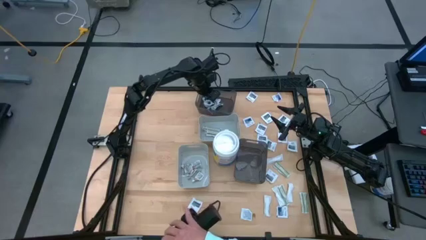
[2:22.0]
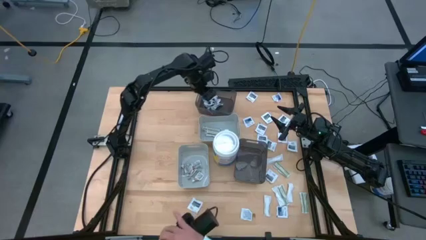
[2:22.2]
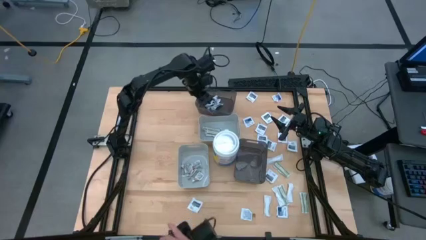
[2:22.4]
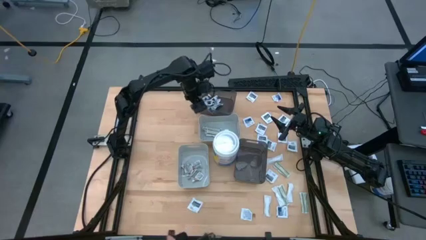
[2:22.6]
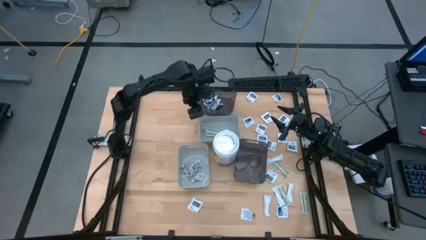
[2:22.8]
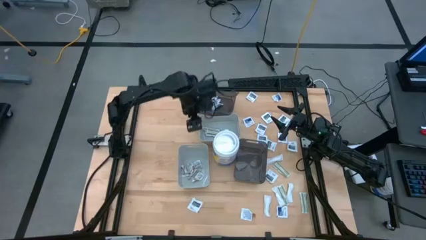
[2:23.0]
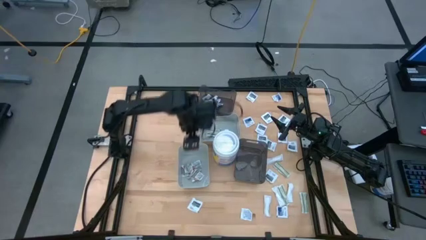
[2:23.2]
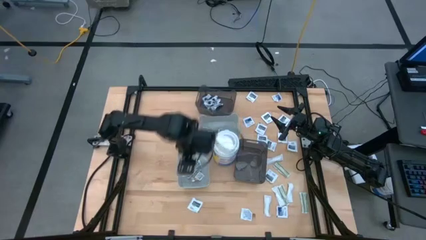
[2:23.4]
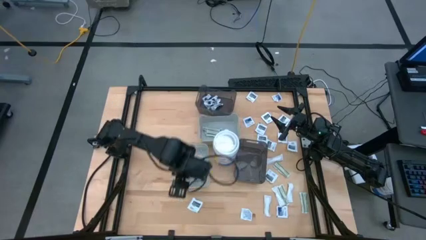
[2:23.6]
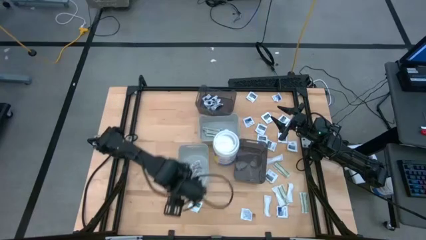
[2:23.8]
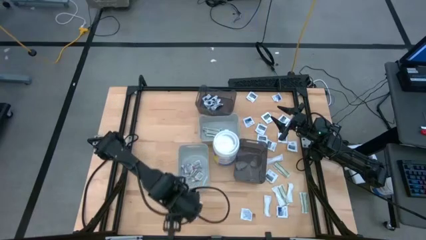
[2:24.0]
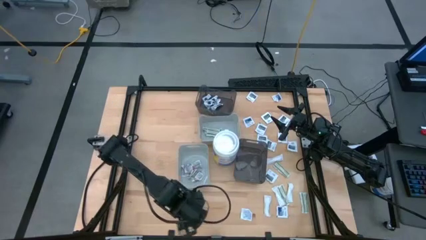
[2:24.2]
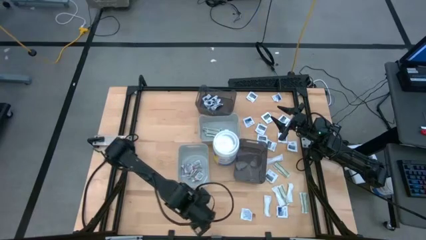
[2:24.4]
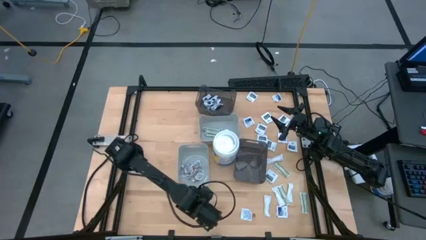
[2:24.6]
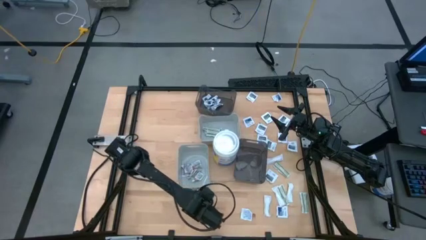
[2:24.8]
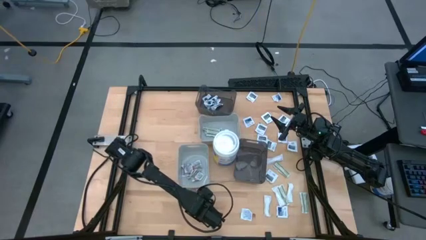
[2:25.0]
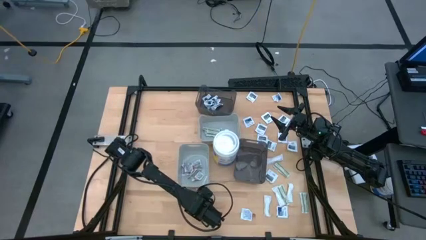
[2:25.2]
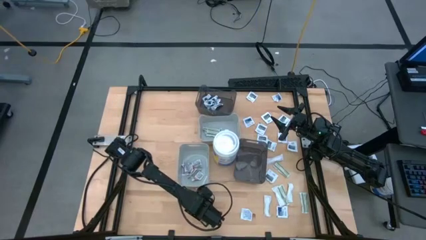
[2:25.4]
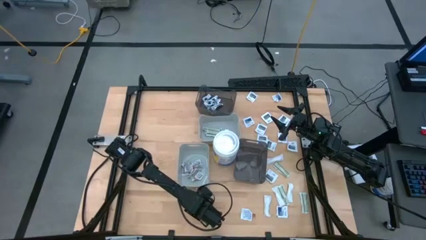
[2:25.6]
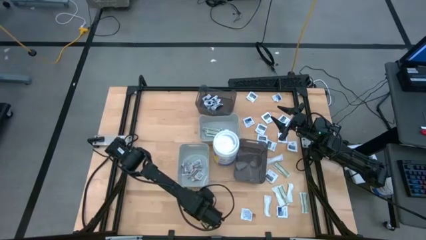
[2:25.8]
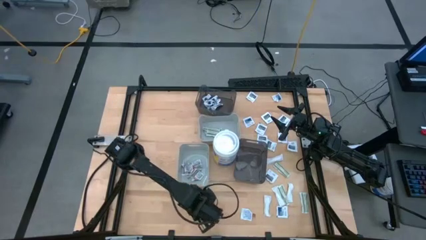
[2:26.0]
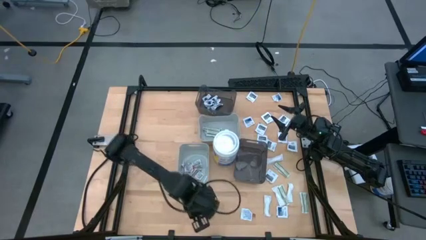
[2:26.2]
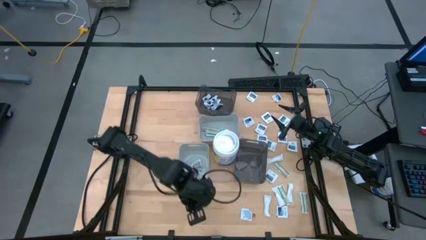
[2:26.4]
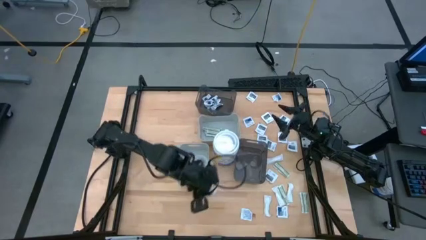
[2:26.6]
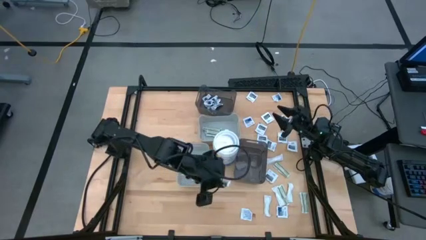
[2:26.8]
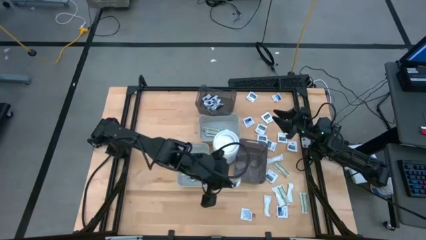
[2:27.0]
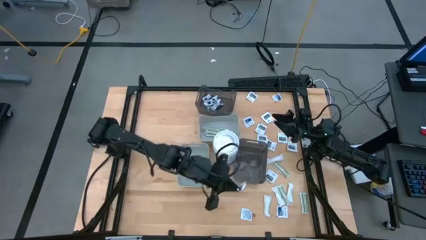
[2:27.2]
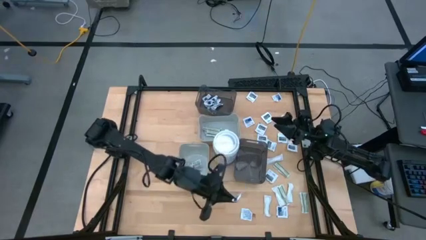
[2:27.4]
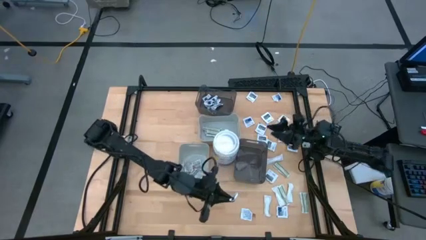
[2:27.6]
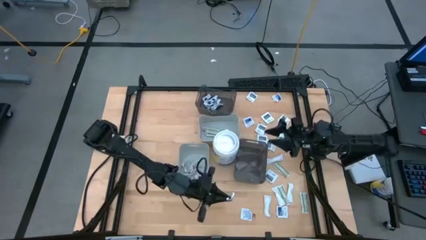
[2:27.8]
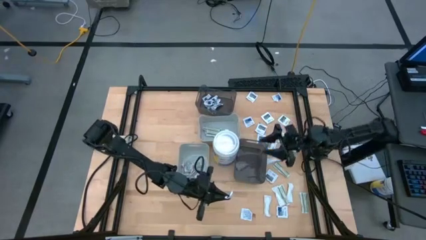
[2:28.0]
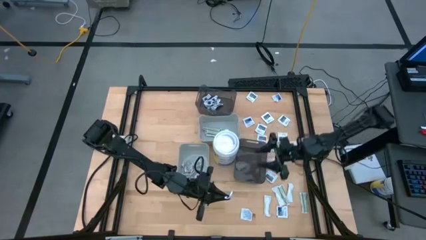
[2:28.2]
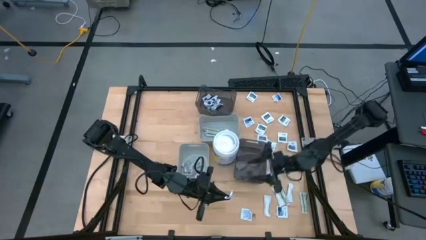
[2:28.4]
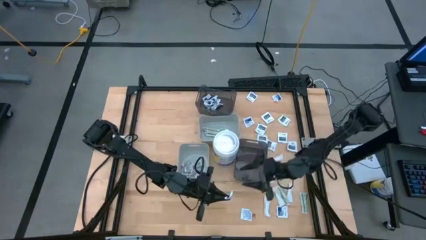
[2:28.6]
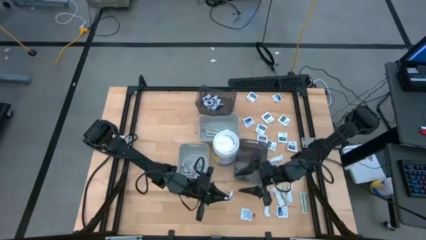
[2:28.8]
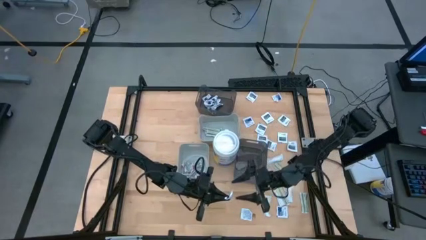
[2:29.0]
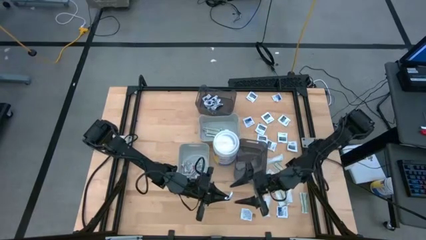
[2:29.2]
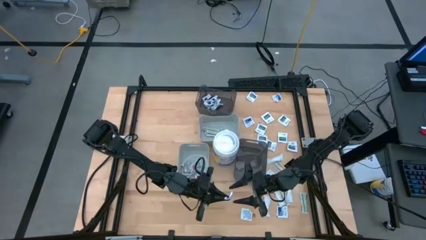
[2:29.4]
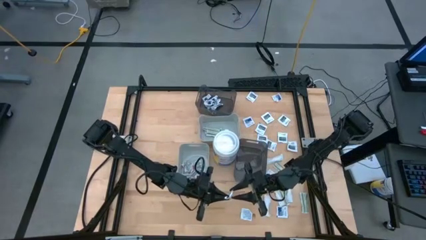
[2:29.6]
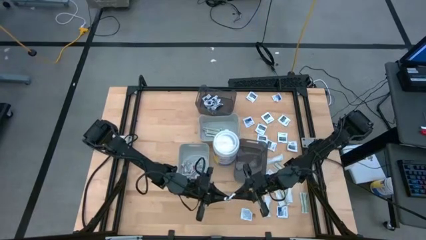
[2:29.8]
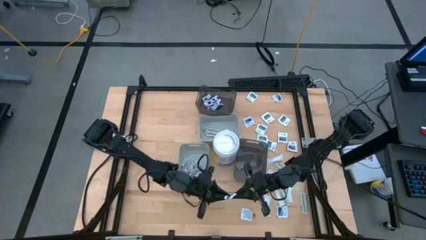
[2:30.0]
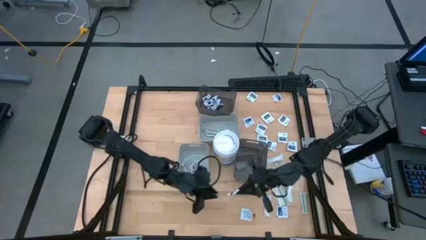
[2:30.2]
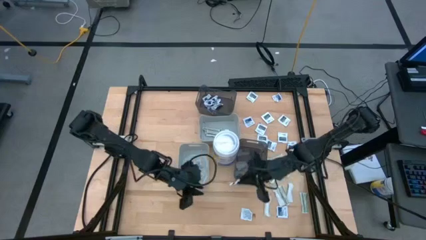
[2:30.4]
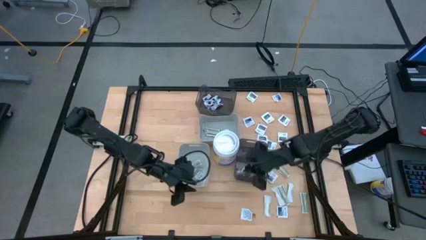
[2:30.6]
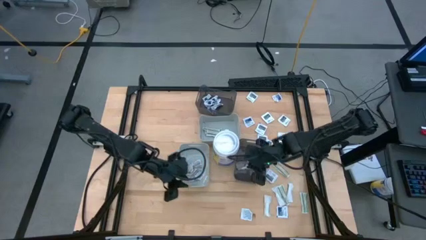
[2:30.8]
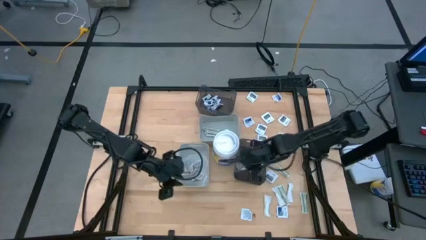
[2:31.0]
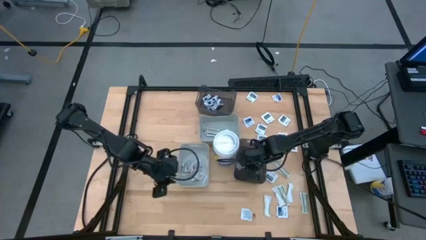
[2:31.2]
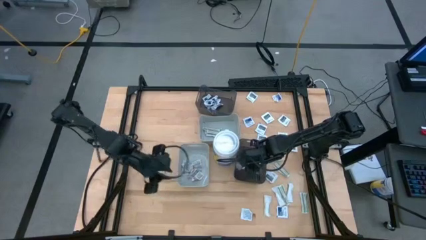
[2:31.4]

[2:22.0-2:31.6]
Task: Pick & Place First Aid Supplies
Put the towelette pack into the bottom transparent black bin

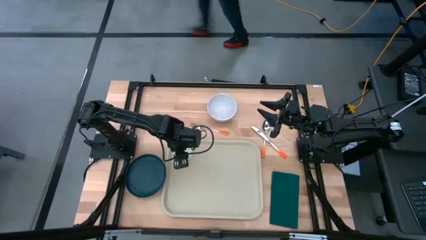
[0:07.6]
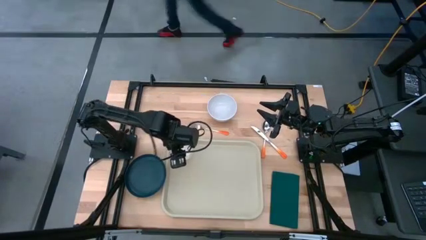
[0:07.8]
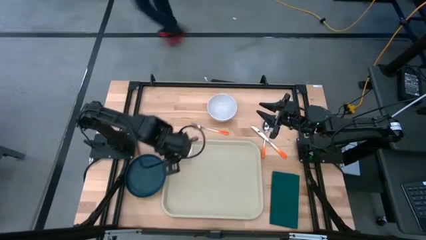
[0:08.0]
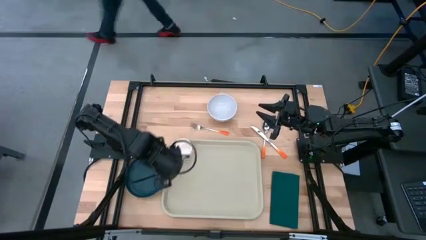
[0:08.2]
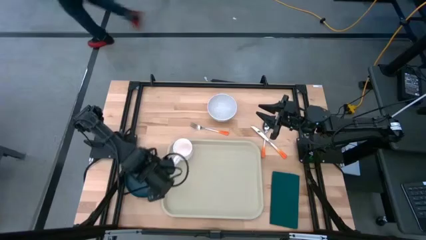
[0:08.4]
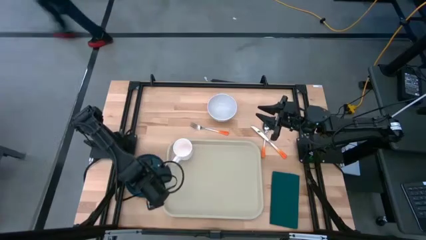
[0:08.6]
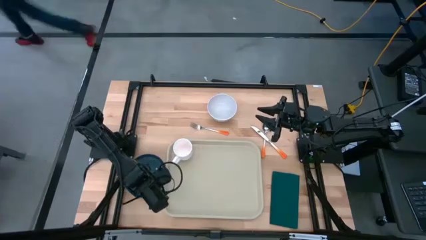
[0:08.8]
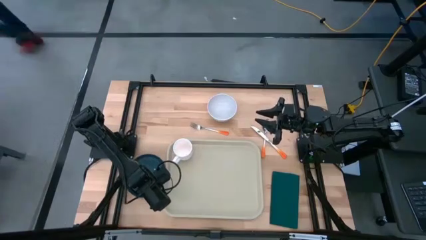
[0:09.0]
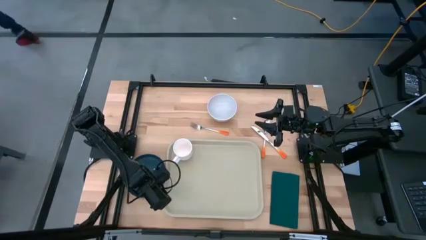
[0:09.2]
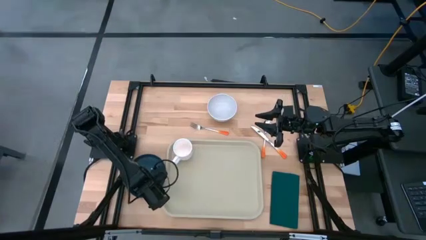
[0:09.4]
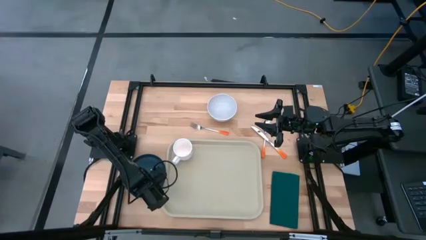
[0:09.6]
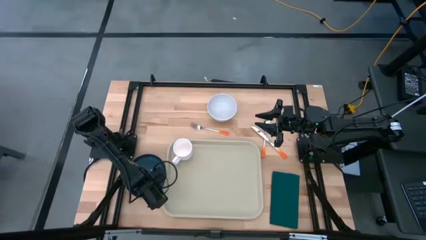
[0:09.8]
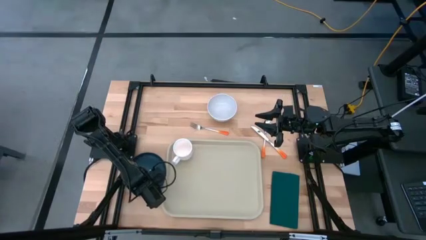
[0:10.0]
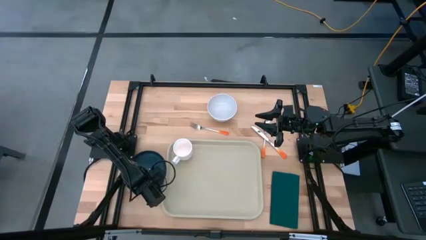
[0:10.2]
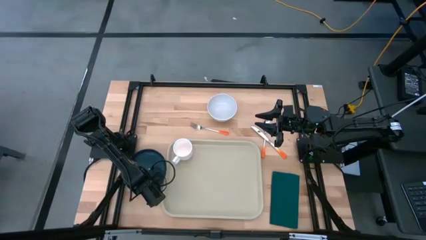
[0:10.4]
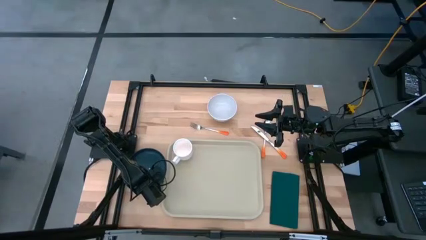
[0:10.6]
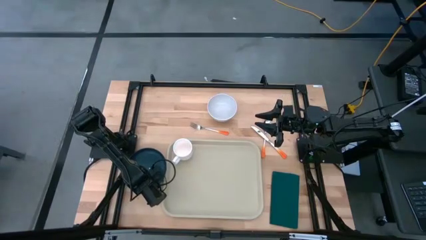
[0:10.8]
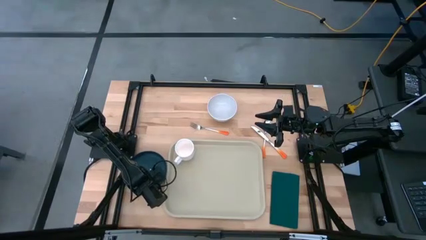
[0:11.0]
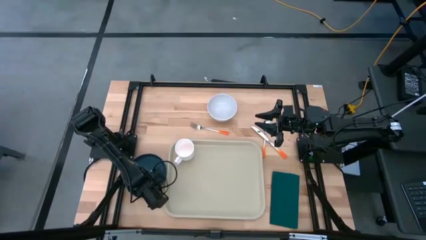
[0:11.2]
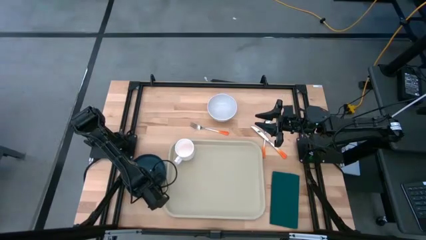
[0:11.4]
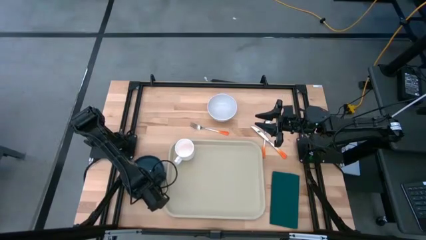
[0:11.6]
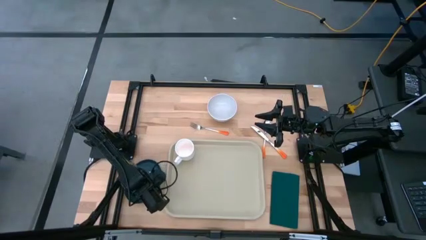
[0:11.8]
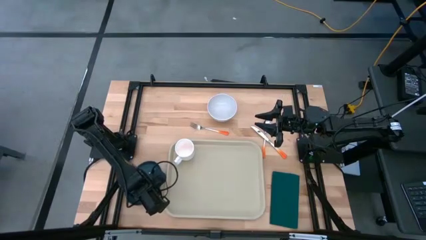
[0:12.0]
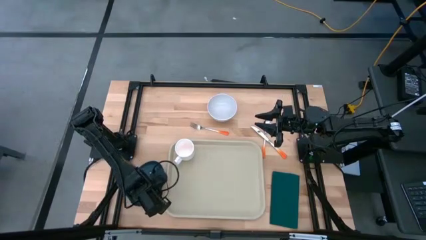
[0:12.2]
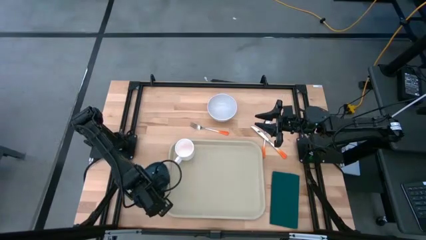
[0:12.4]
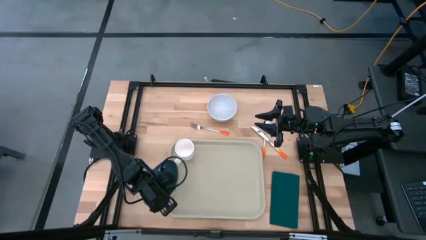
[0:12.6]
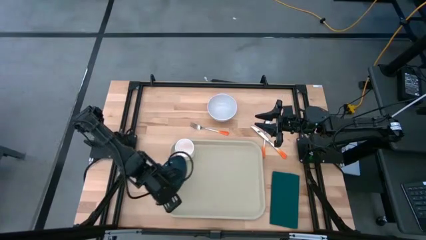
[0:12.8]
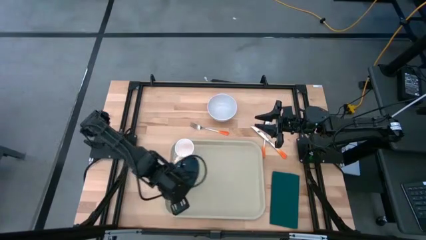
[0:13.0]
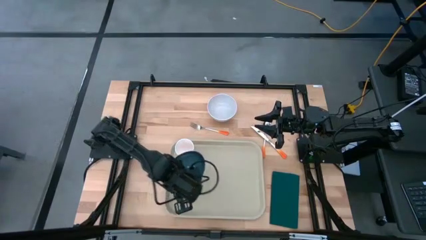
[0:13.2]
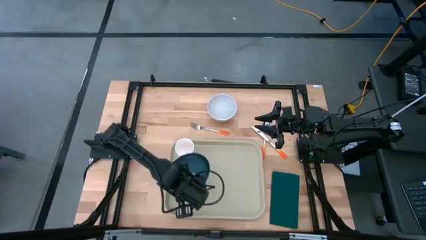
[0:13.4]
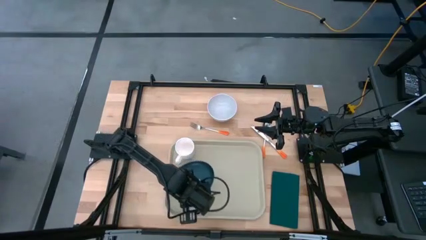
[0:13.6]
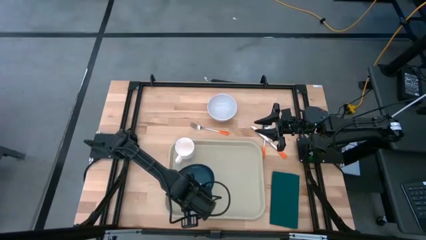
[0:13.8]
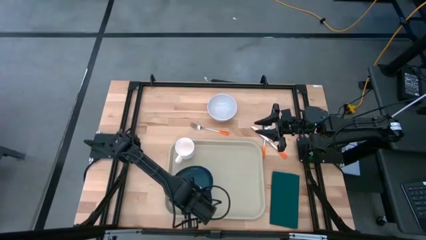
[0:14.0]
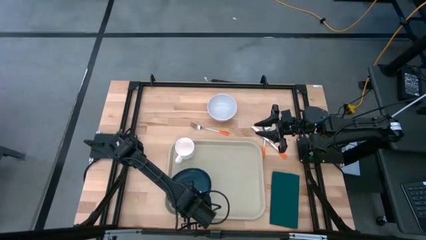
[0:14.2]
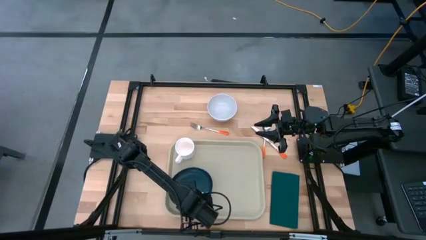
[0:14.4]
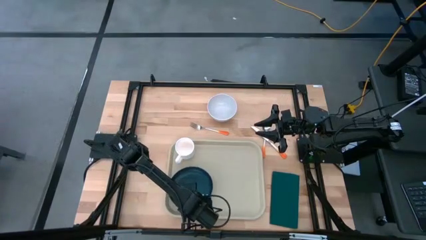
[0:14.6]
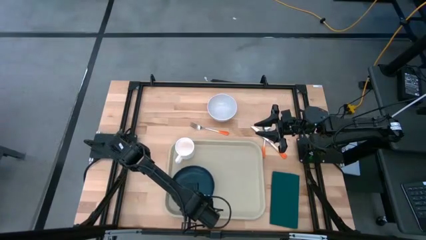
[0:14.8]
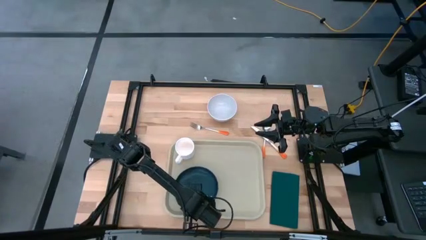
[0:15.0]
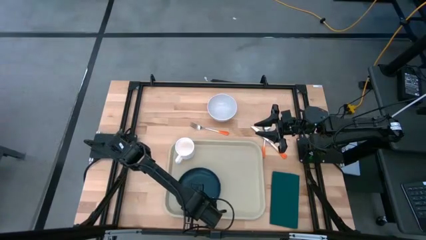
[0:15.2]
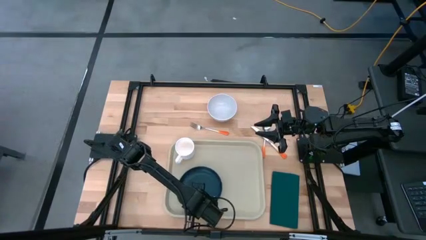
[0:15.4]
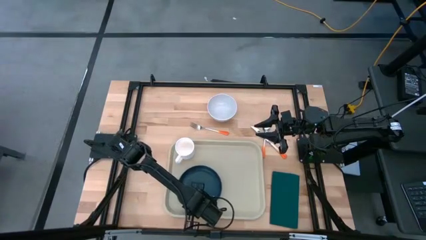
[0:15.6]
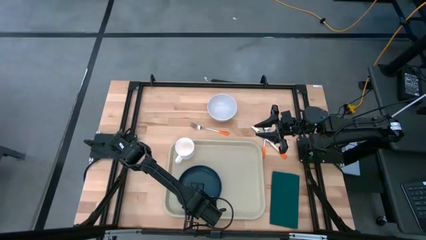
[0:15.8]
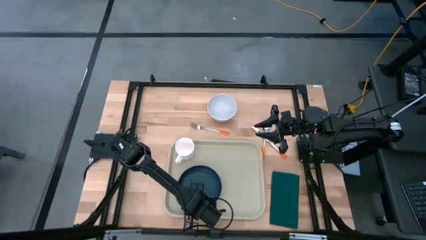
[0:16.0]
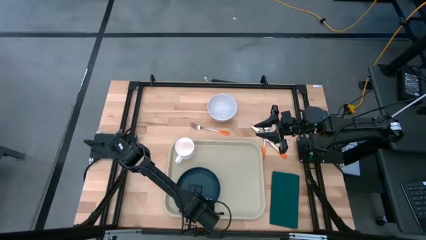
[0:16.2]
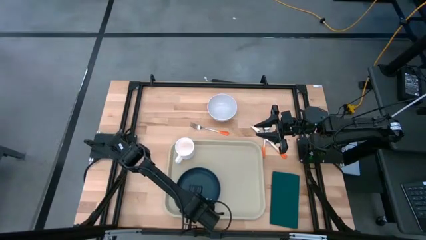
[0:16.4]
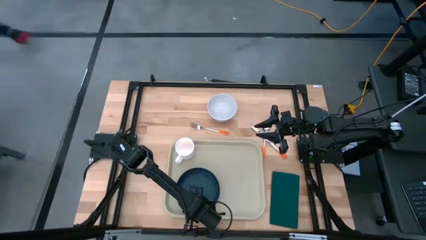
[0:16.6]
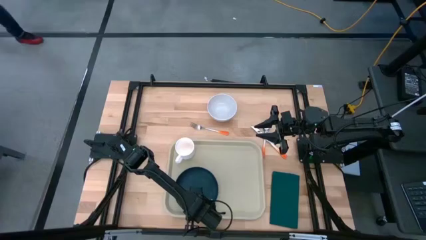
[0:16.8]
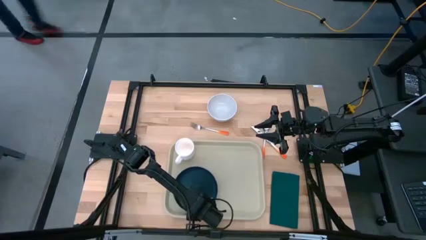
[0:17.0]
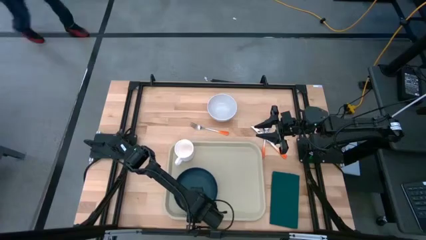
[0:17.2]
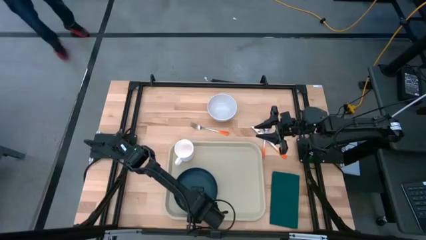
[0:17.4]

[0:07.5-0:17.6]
Task: Set up tray
Put the black plate on the brown serving tray below the white mug
